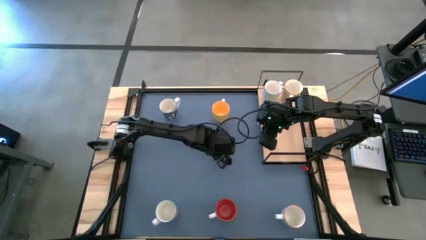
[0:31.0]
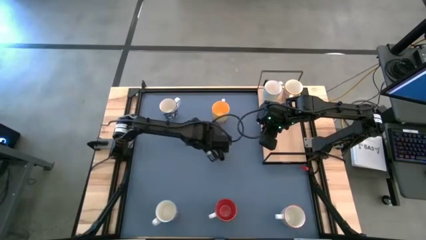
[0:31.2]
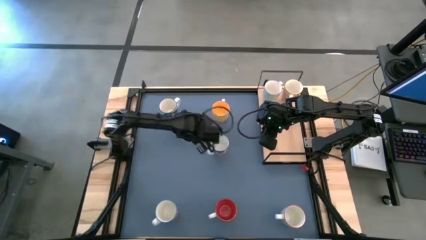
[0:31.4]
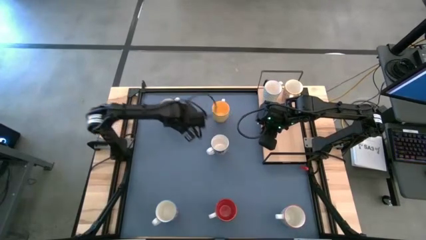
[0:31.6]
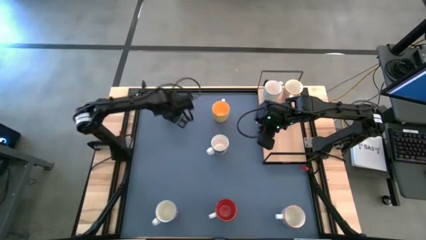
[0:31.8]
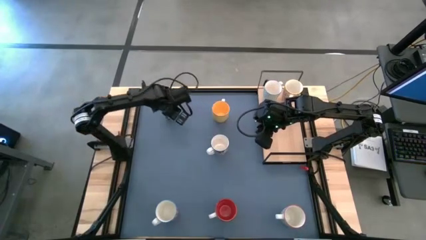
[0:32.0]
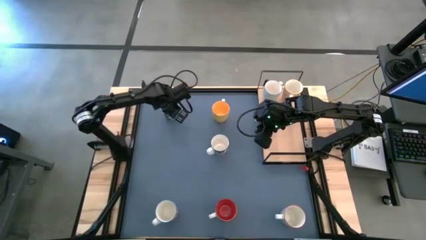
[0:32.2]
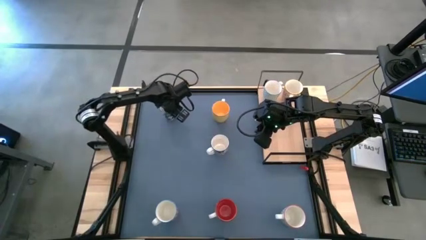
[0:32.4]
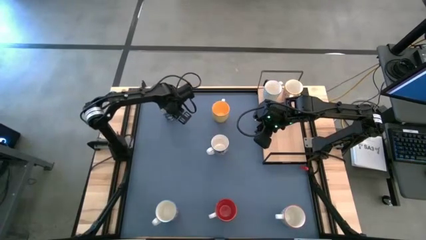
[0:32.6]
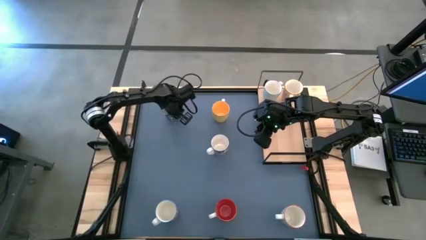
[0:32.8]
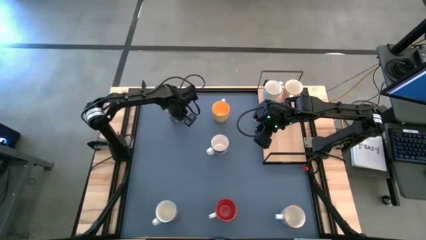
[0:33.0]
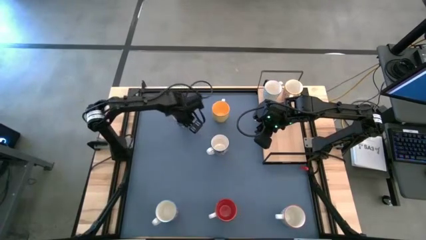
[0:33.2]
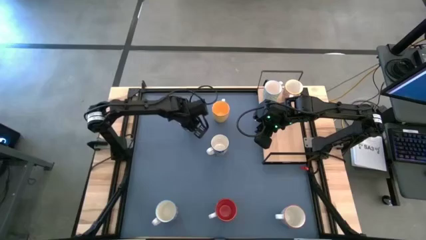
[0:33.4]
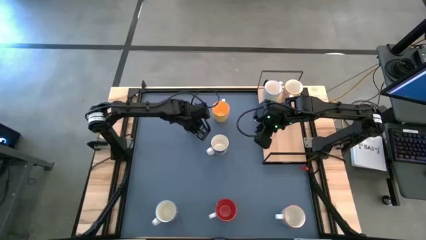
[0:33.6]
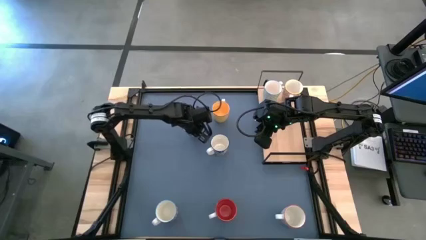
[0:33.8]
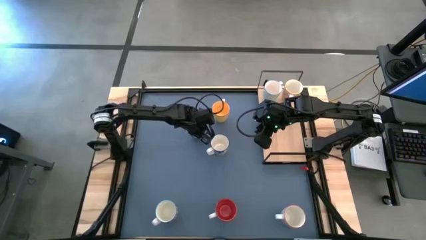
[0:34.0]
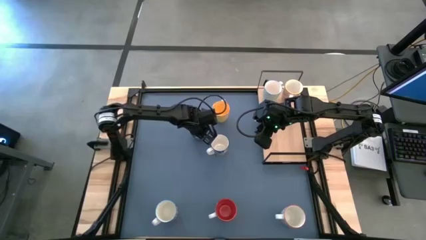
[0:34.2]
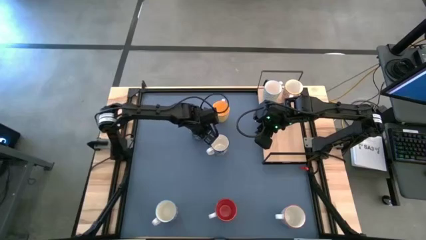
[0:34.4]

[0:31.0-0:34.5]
Task: Place coffee mugs
Move the blue cup to the top middle of the table

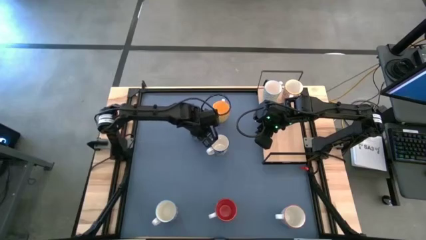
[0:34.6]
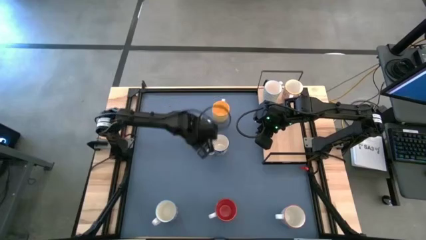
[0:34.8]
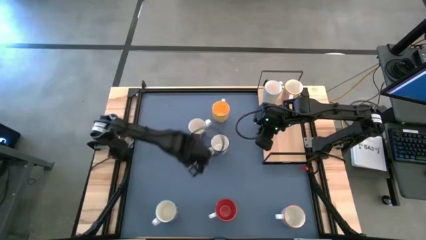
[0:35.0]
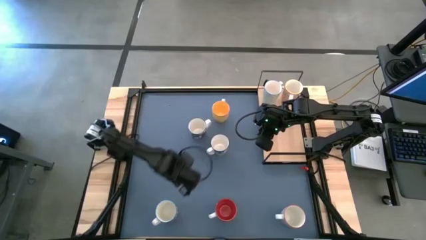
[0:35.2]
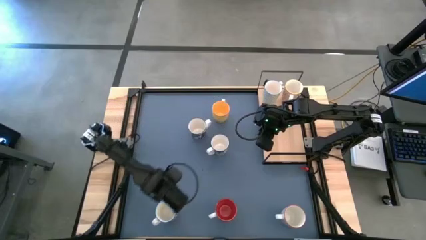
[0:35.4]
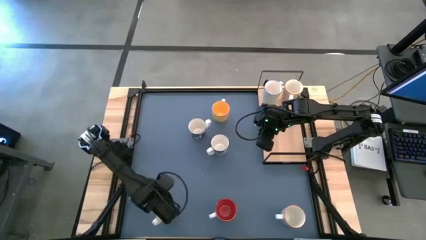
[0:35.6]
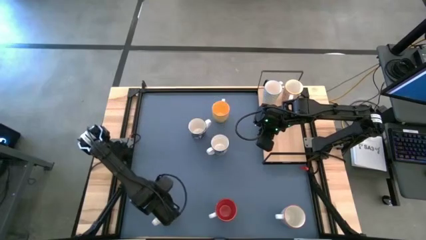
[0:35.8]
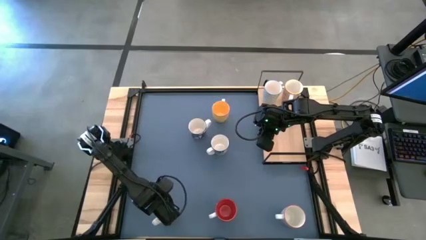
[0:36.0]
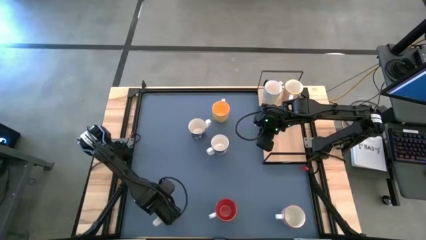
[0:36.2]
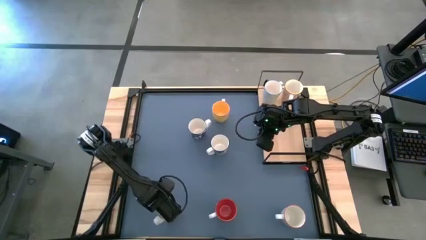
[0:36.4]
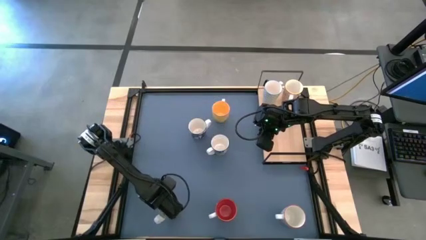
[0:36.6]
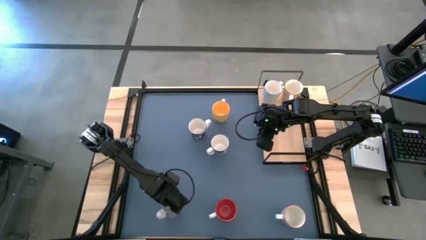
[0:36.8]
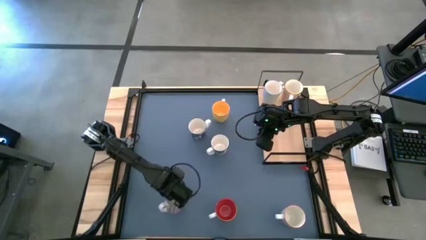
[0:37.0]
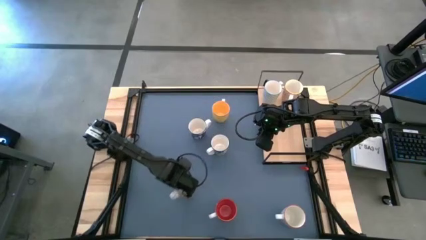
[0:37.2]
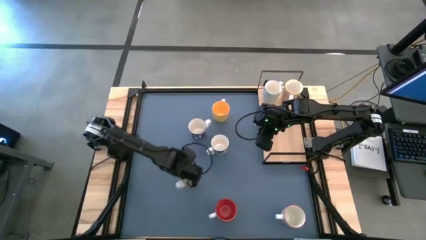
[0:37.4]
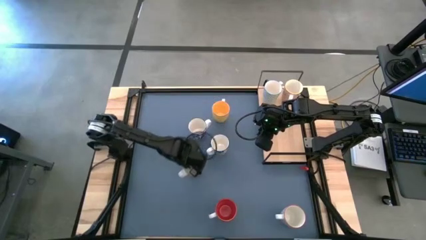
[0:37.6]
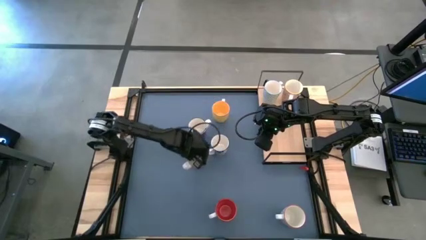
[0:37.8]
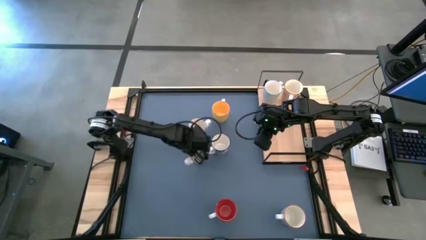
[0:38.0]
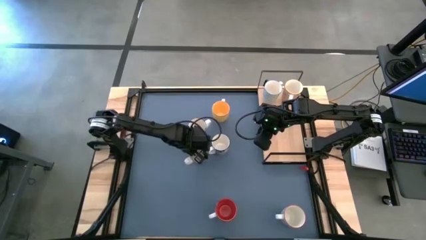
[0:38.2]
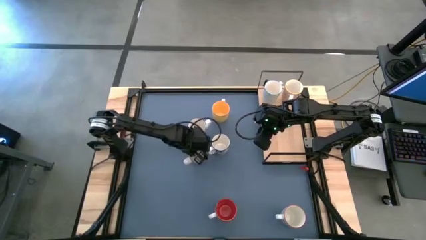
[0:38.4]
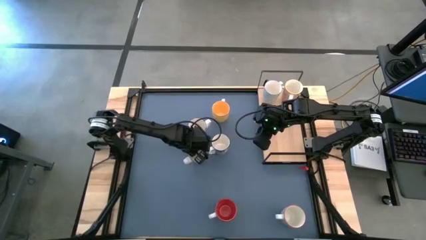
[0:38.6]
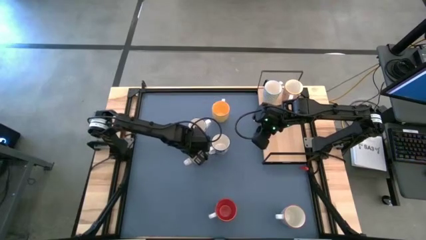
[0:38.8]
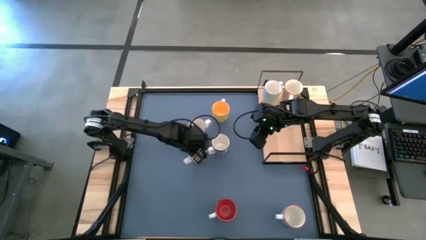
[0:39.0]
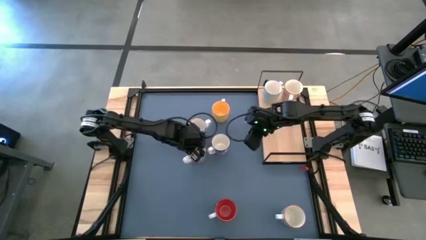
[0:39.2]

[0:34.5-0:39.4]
Move the red and white cup to the center of the table

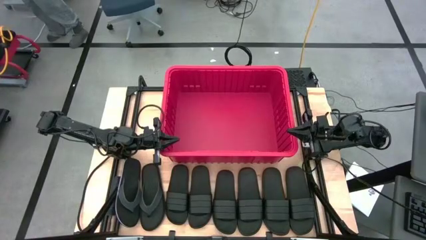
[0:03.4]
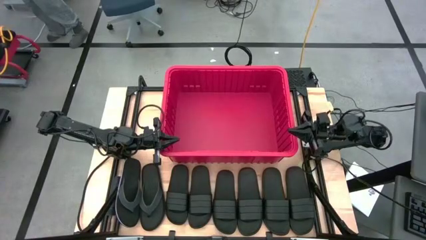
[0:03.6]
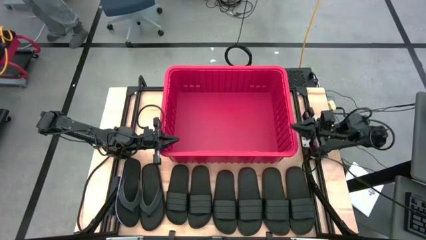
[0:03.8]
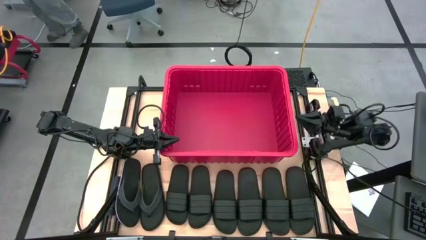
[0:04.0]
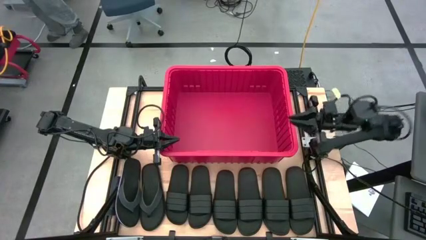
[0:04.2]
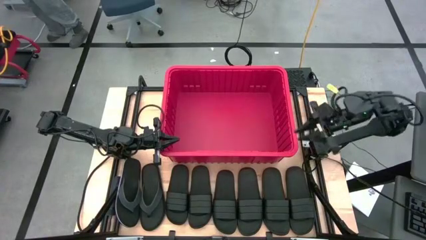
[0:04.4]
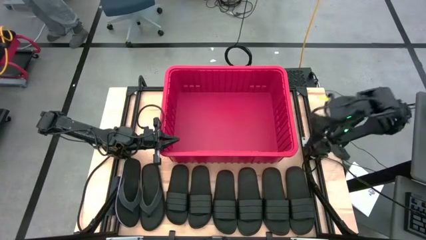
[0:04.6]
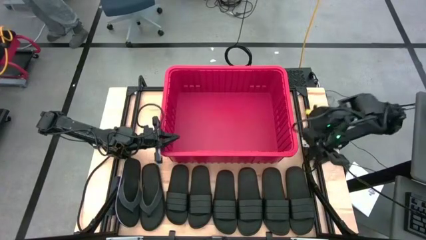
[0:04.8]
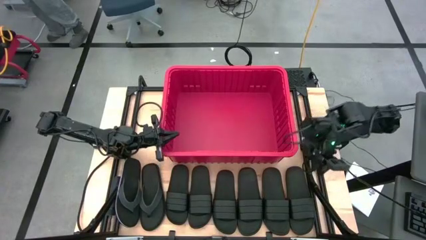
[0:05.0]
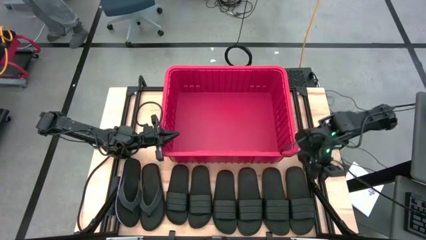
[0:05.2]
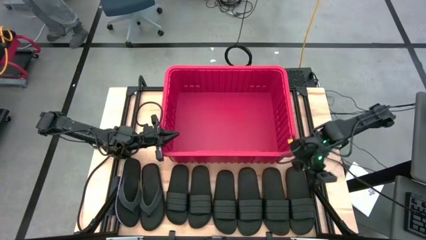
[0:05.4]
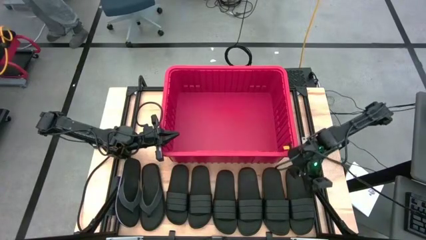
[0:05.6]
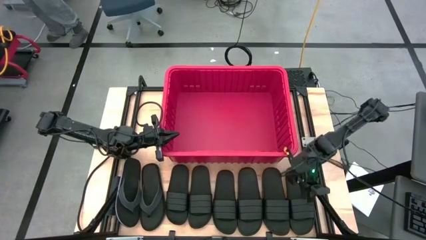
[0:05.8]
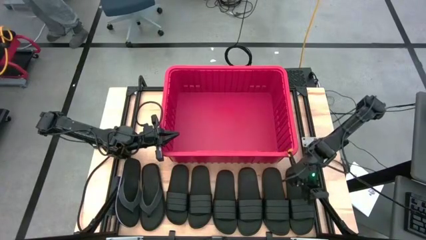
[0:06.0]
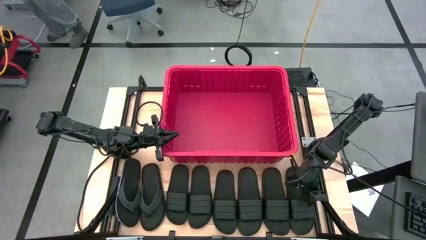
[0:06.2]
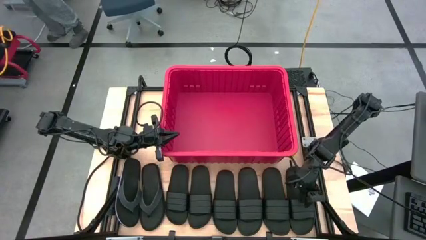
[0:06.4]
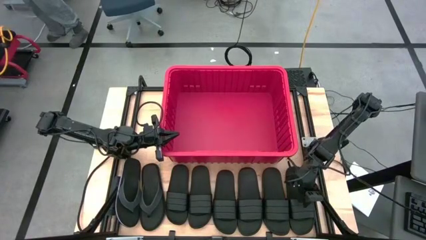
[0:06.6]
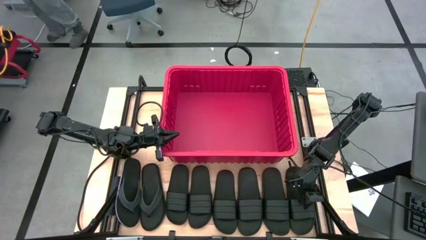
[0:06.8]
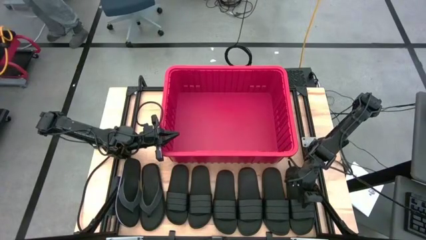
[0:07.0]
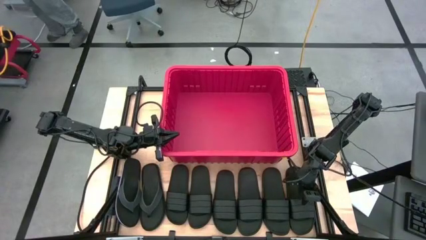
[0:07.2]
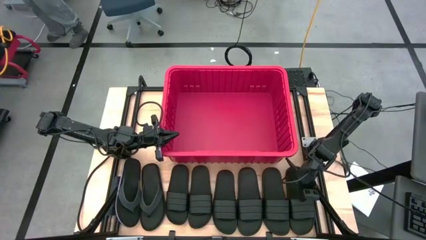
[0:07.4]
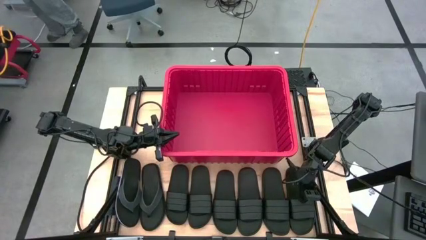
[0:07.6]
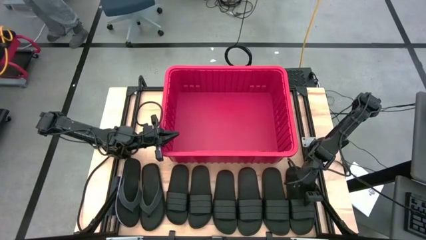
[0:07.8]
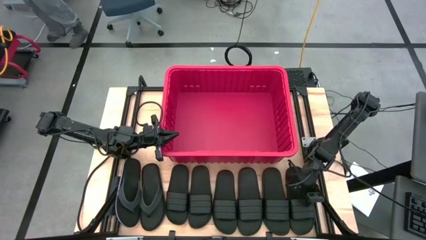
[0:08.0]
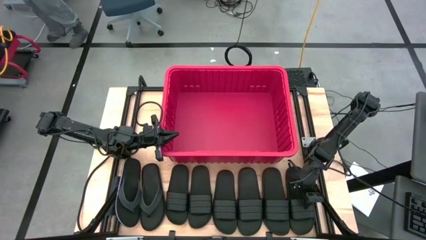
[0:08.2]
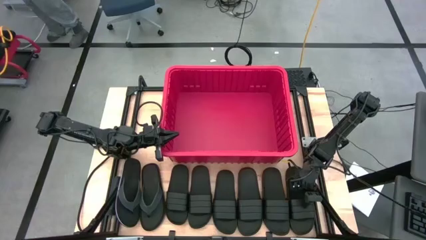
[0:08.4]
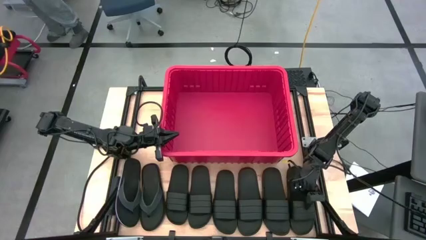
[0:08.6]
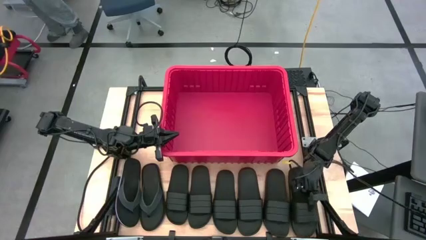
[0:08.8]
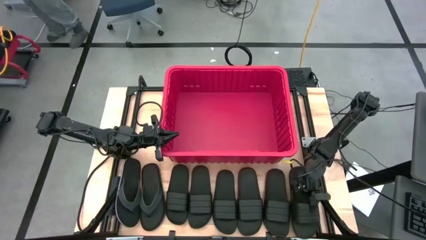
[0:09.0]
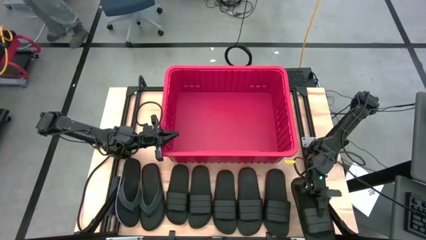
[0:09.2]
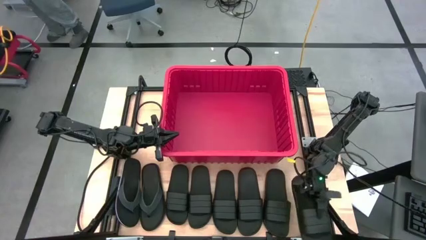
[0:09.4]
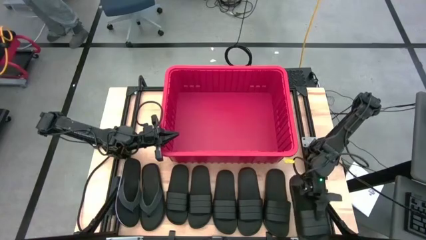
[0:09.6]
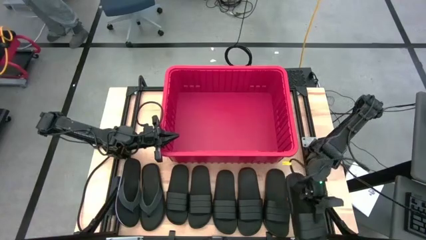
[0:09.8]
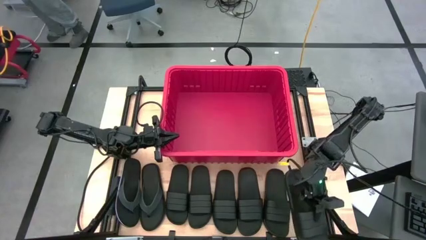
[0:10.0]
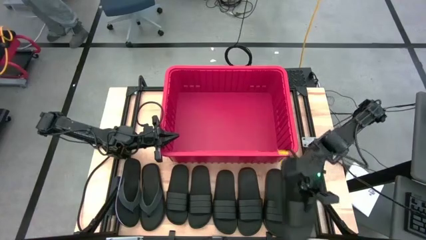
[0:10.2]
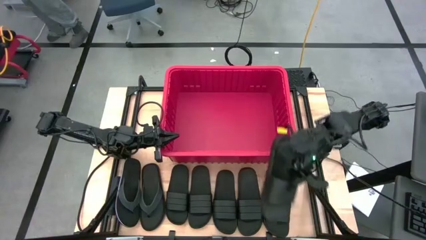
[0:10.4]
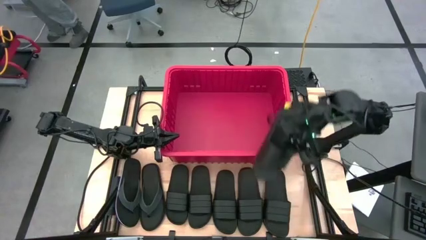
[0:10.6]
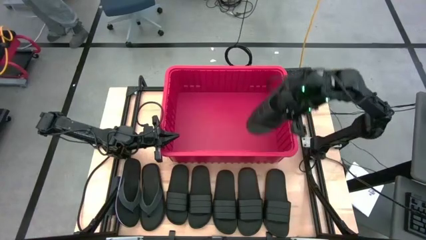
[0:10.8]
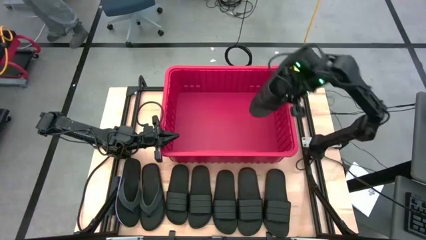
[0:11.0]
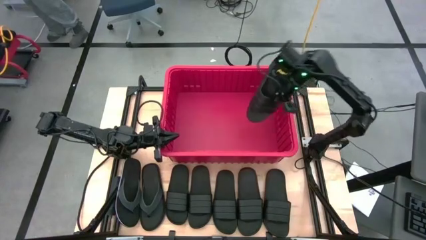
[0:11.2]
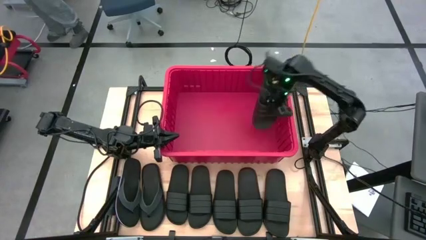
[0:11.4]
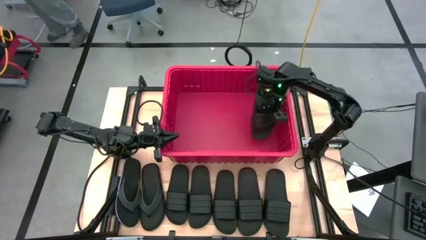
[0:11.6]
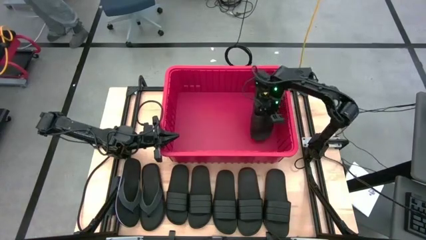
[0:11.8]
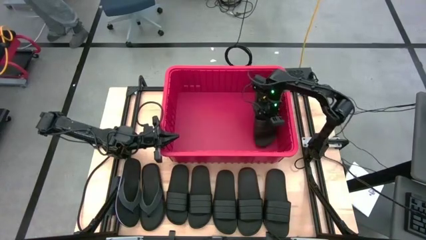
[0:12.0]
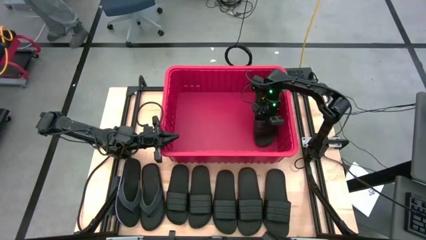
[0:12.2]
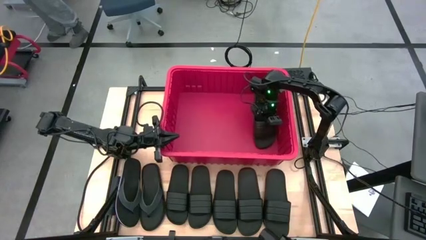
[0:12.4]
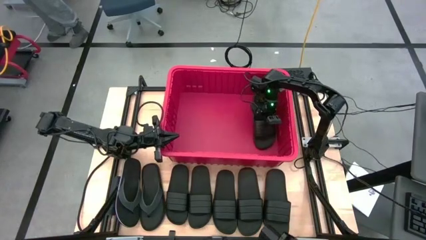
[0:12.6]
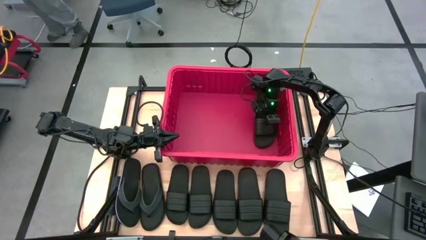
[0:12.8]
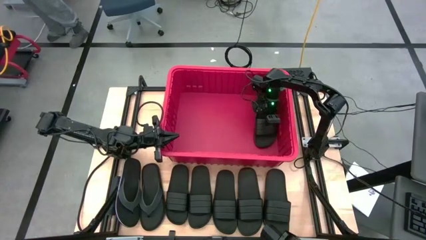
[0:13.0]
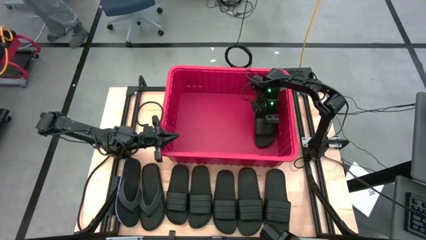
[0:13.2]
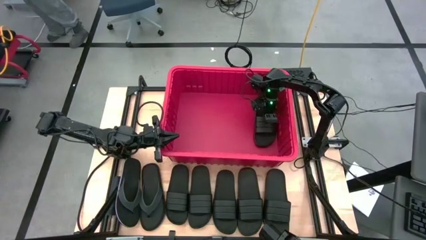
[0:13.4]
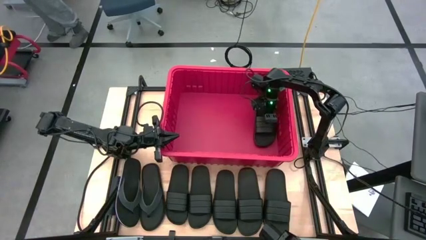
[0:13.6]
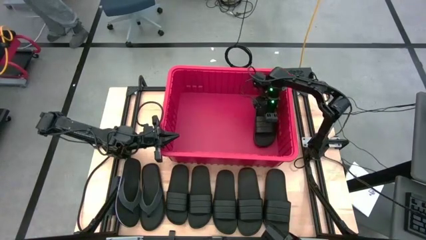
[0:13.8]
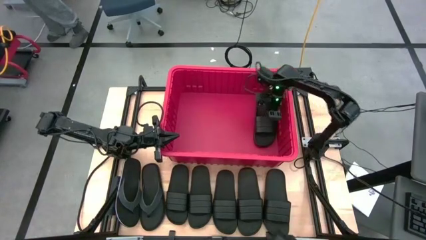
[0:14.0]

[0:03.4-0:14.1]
Task: Pick and place slides into bin
Put the black slide into the red bin
